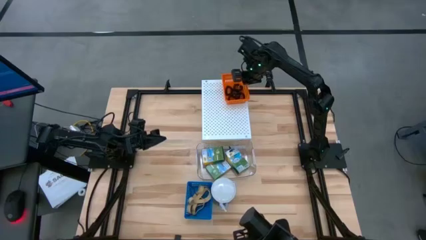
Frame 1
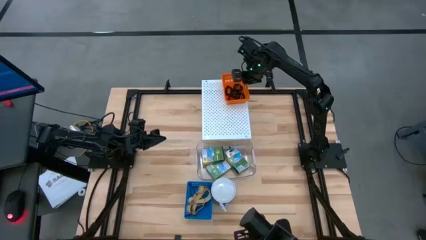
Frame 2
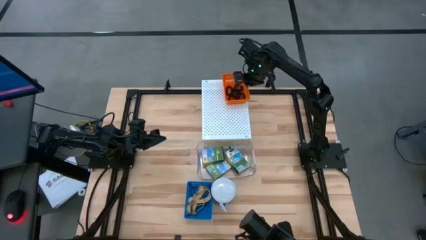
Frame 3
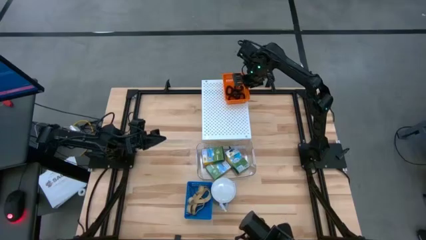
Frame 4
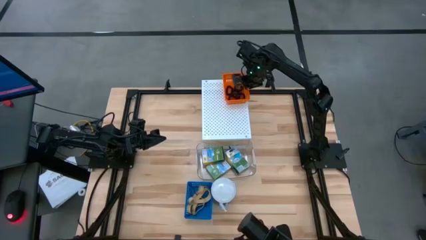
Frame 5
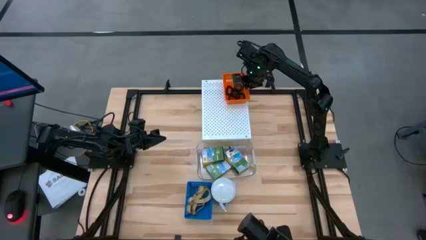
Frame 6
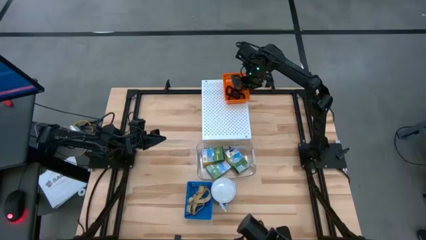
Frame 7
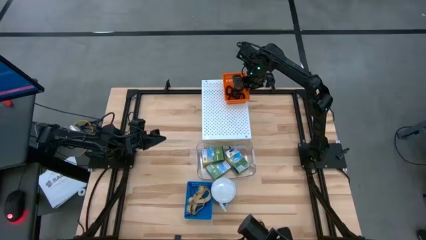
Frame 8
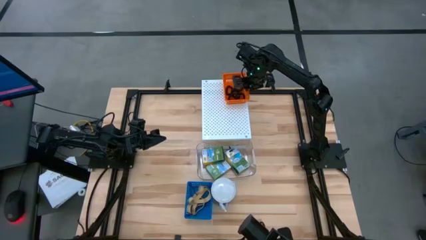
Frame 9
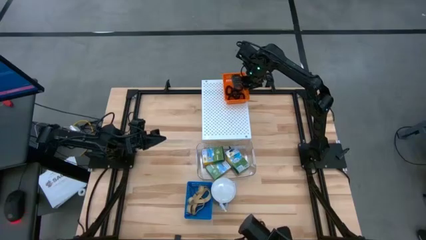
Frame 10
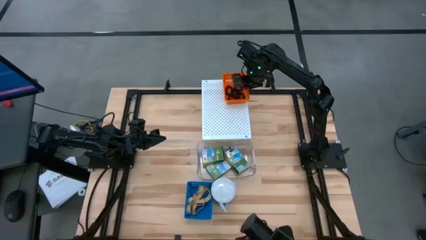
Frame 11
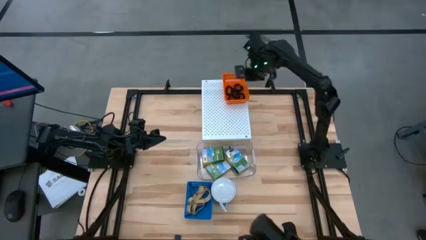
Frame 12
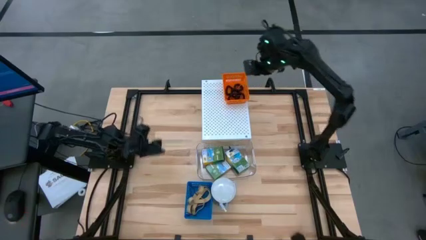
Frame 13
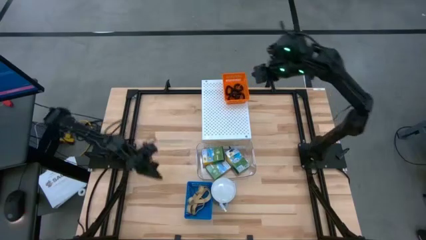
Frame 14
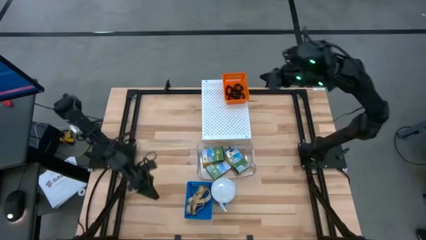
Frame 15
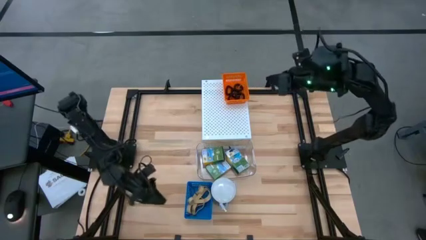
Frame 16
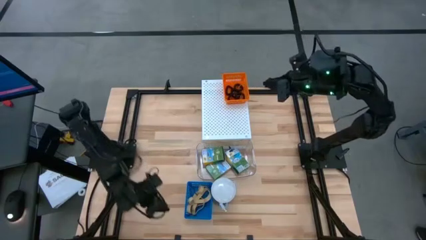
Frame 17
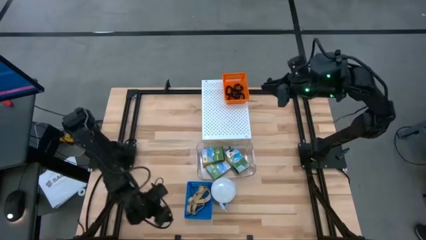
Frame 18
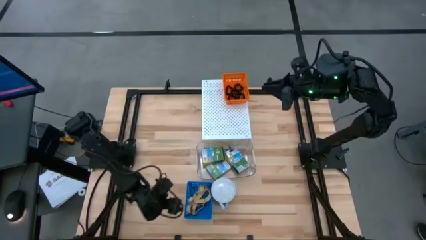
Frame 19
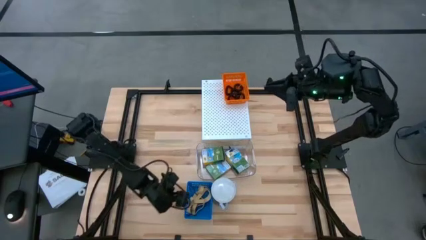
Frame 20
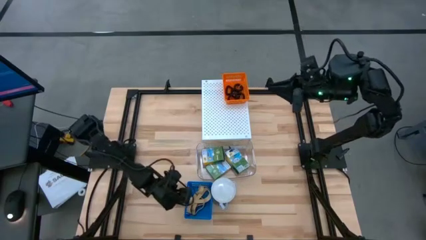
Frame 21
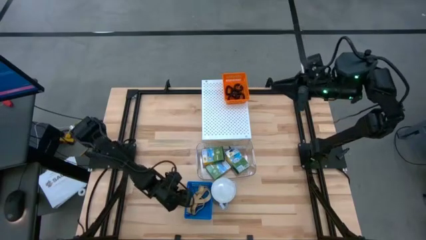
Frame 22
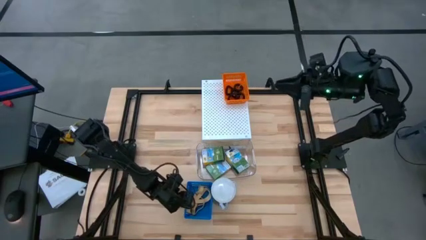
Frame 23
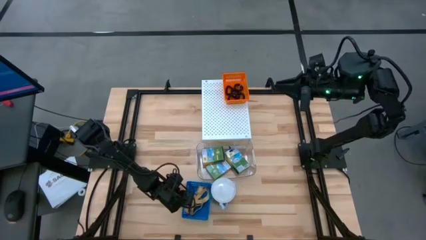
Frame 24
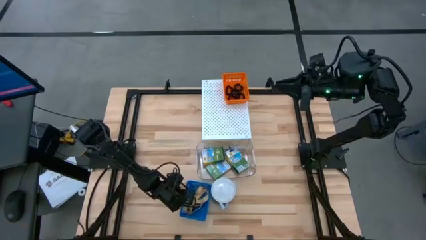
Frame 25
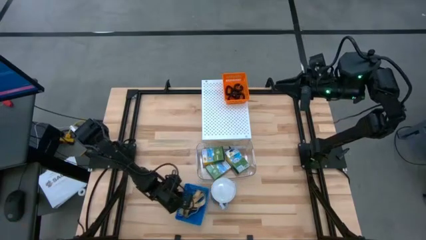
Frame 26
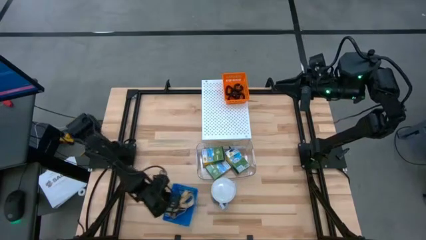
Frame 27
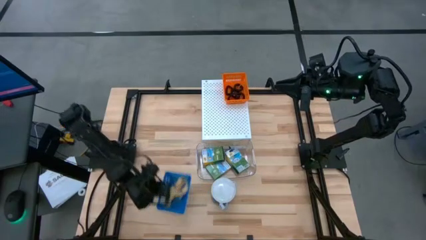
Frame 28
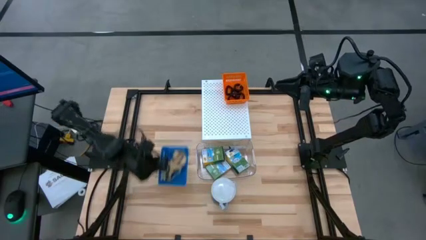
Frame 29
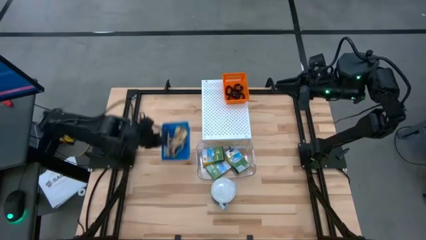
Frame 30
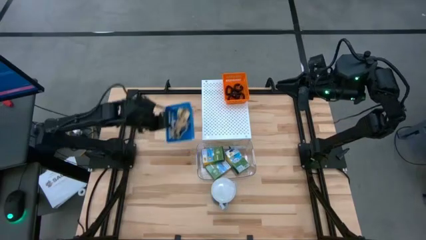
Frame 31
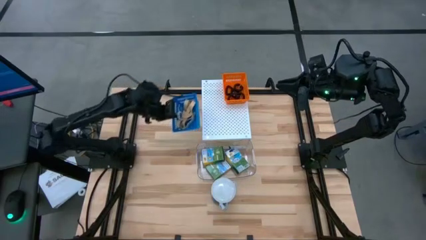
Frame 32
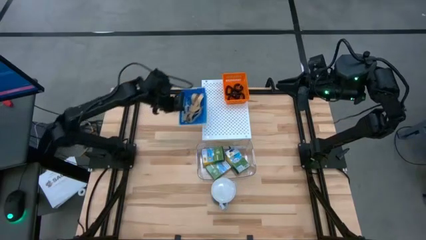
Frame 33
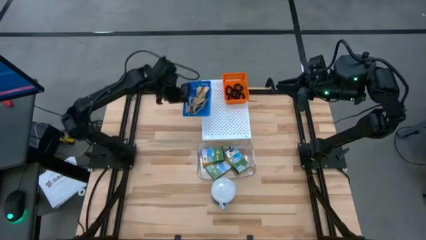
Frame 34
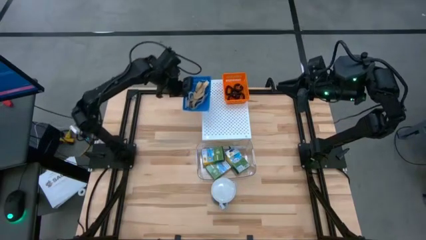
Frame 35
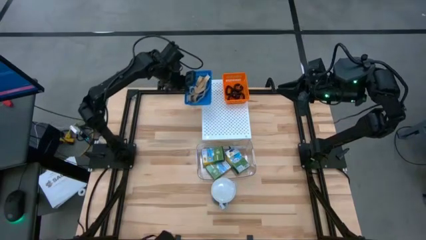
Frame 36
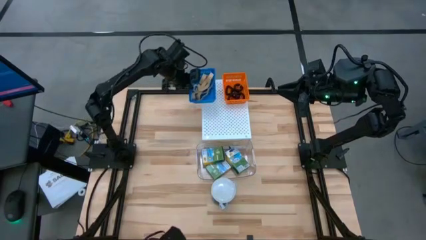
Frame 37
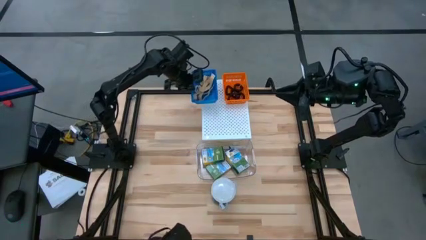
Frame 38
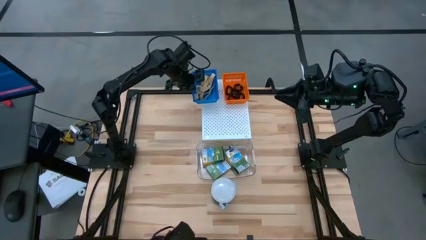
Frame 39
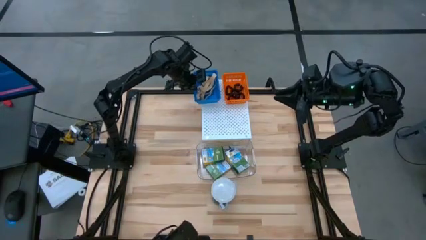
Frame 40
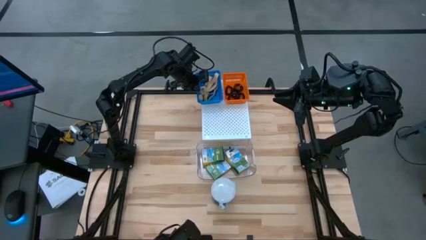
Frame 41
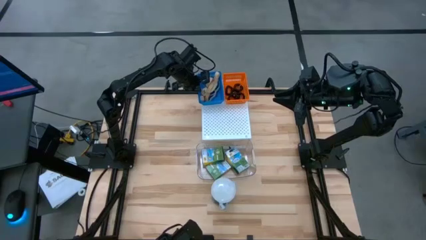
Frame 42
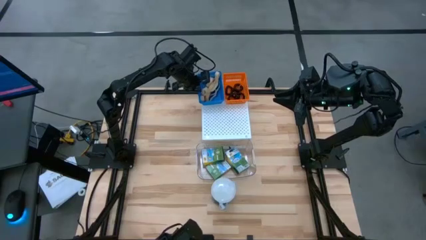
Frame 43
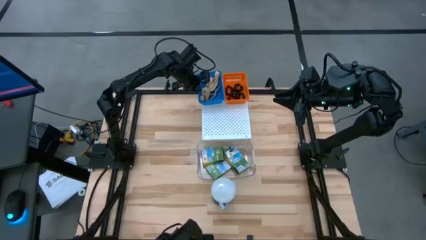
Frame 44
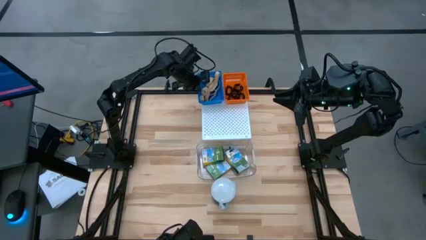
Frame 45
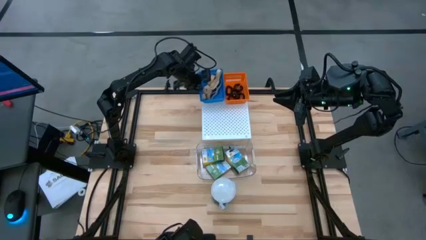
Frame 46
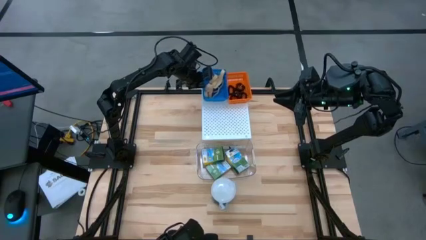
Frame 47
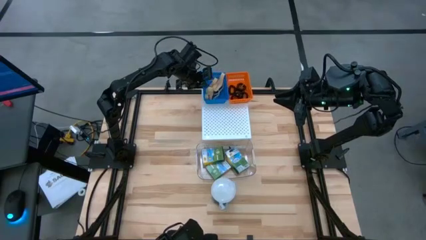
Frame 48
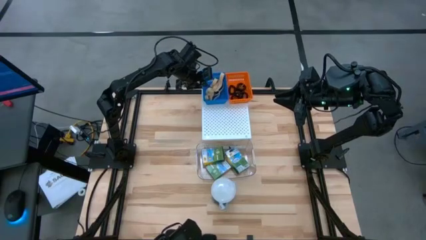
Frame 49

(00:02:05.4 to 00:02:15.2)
Task: Pick & Place Office Desk Supplies
Put the blue bin with rubber bands on the shelf

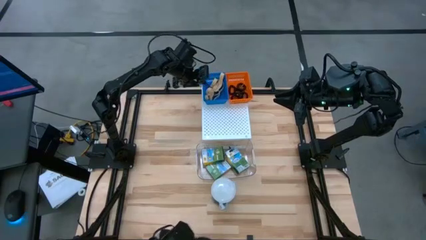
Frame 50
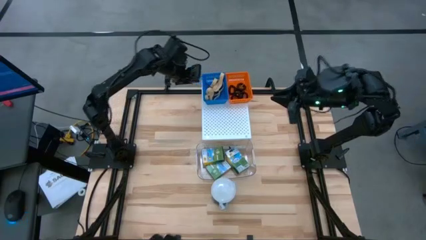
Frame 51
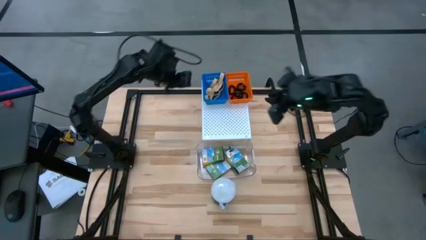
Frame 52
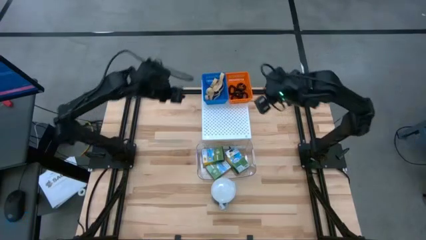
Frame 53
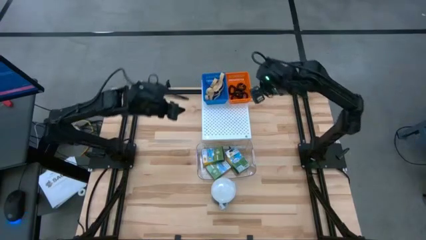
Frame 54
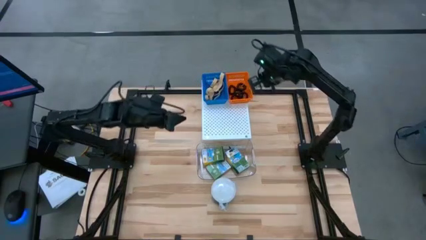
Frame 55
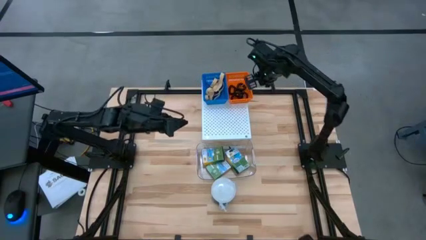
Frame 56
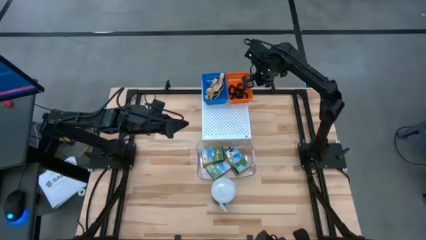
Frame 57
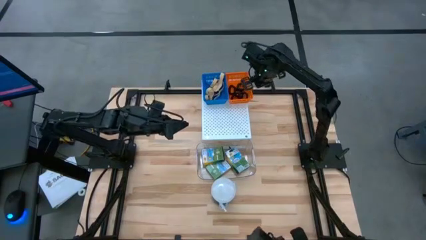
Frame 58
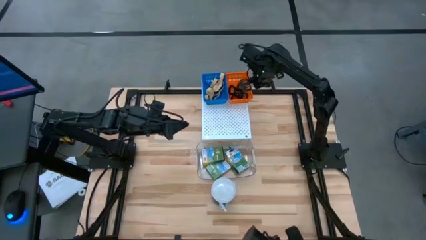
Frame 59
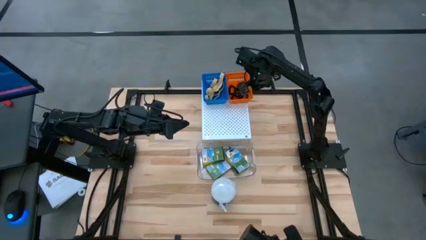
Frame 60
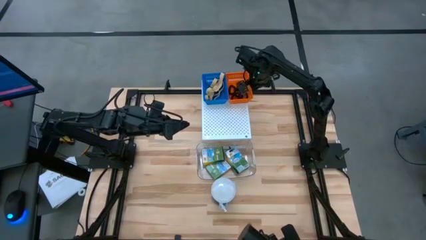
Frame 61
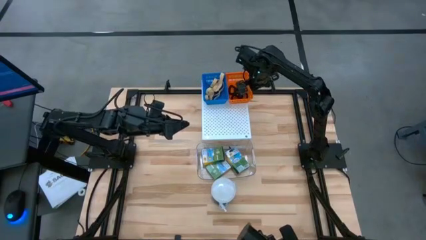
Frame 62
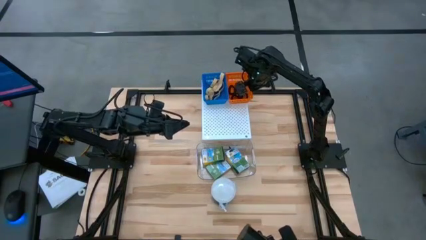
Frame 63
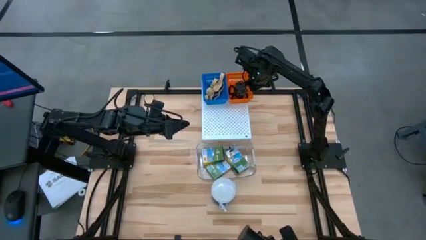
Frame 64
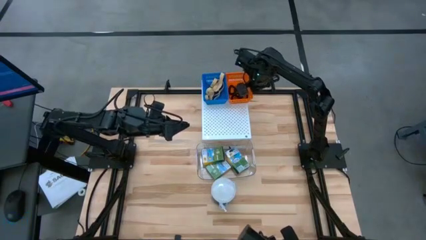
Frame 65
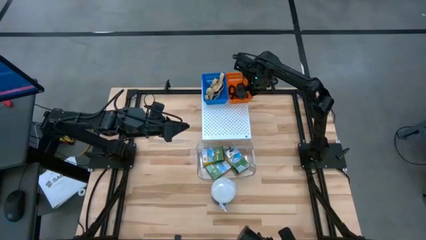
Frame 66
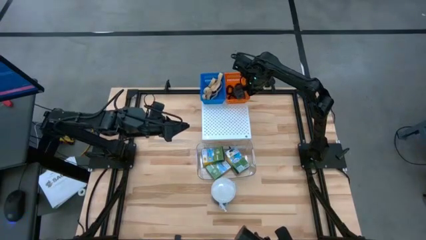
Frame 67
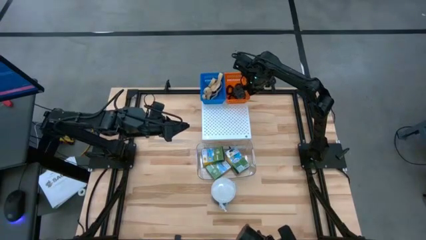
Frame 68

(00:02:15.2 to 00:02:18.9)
Adjust the orange bin on the shelf
